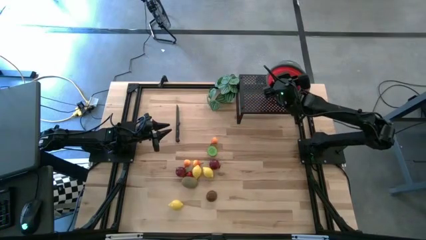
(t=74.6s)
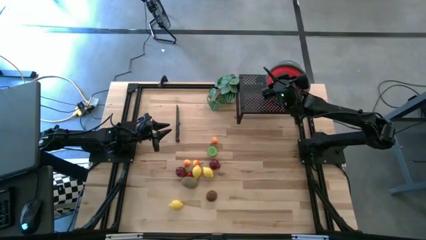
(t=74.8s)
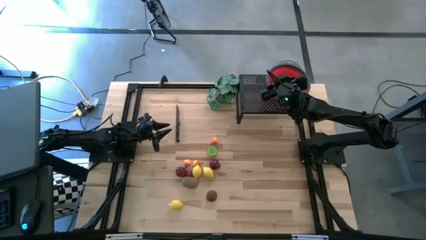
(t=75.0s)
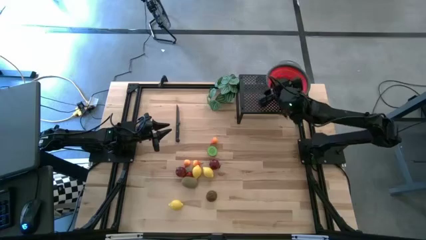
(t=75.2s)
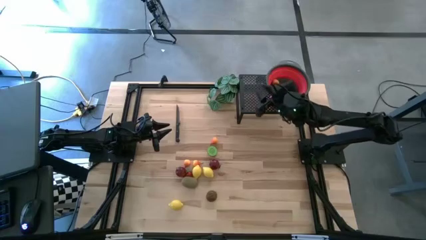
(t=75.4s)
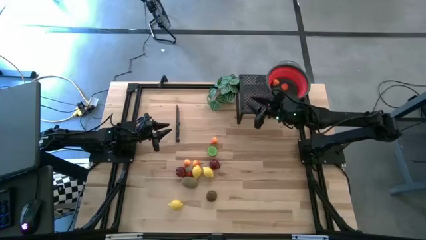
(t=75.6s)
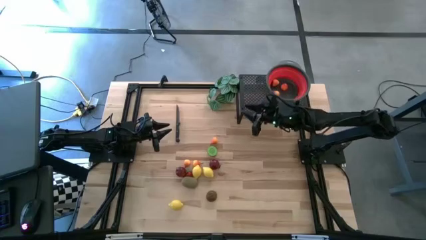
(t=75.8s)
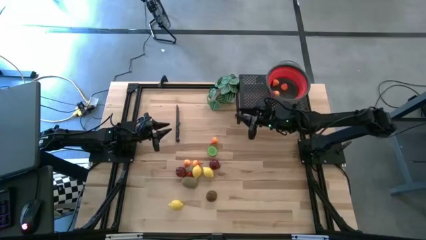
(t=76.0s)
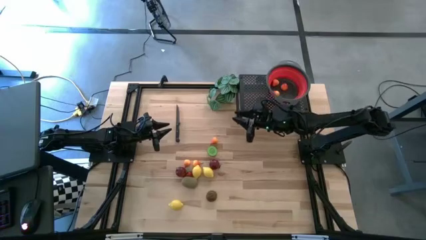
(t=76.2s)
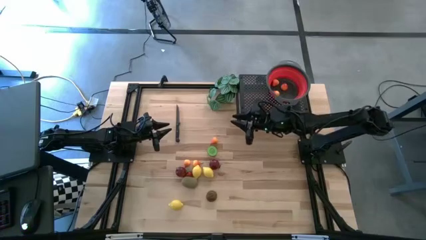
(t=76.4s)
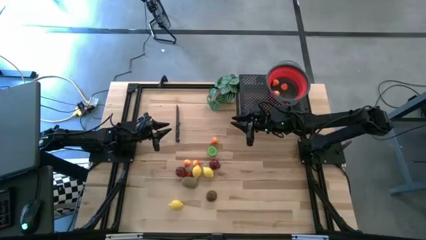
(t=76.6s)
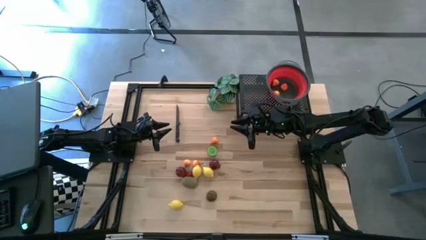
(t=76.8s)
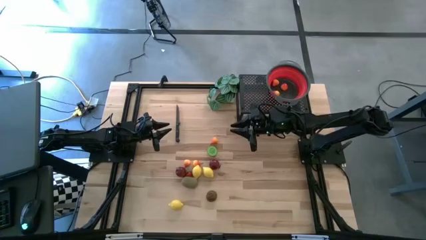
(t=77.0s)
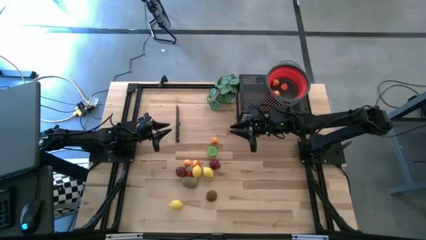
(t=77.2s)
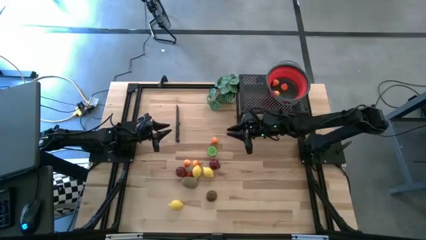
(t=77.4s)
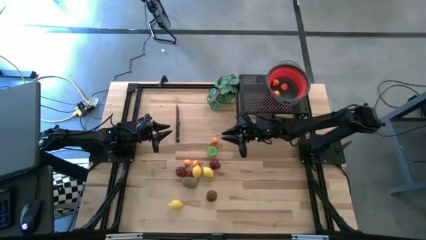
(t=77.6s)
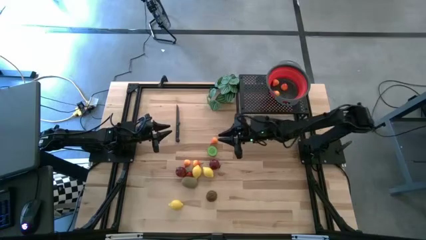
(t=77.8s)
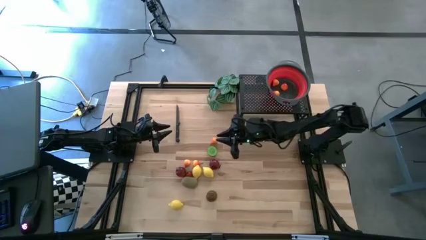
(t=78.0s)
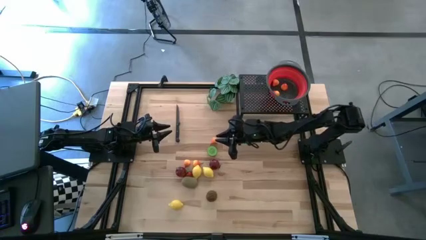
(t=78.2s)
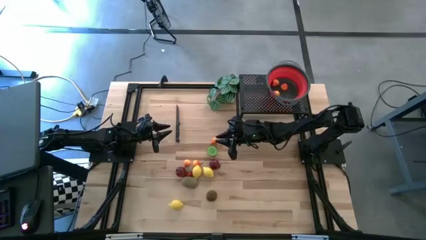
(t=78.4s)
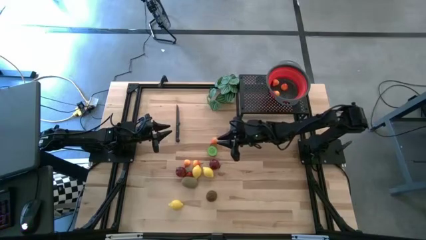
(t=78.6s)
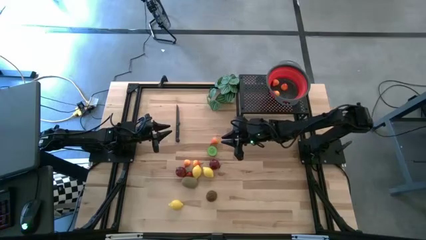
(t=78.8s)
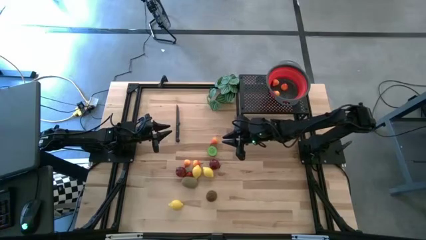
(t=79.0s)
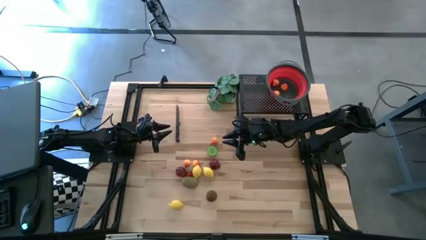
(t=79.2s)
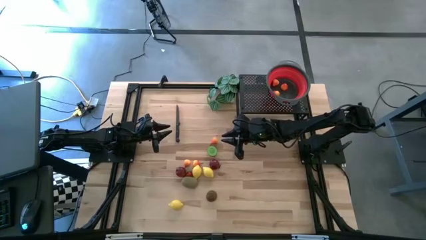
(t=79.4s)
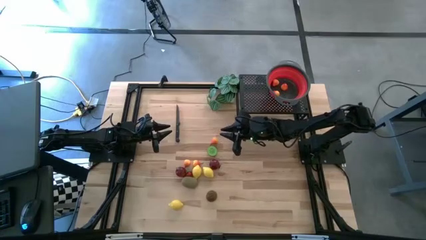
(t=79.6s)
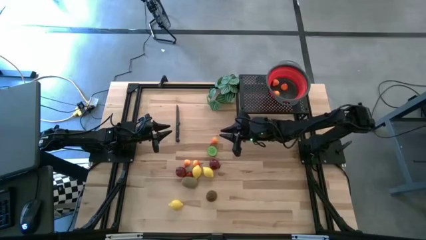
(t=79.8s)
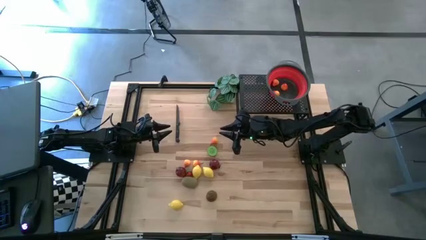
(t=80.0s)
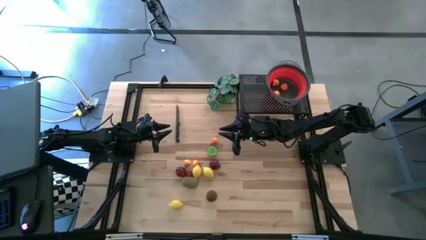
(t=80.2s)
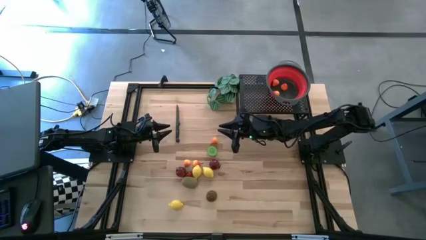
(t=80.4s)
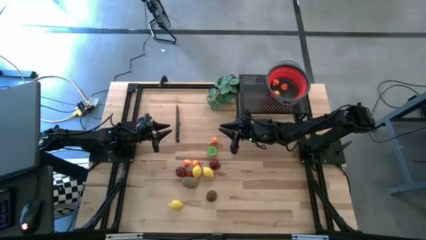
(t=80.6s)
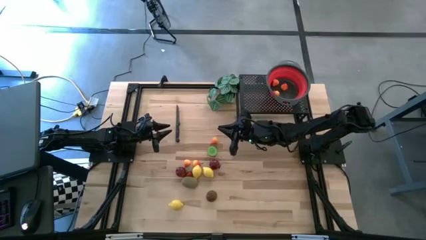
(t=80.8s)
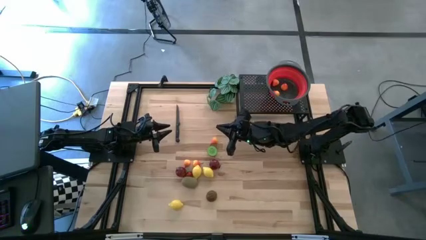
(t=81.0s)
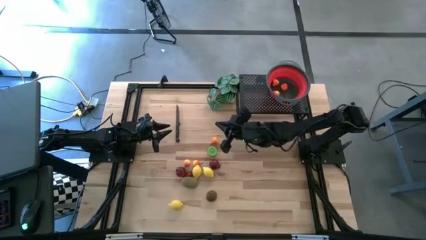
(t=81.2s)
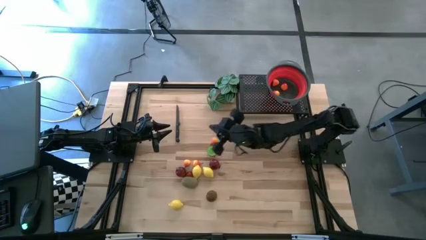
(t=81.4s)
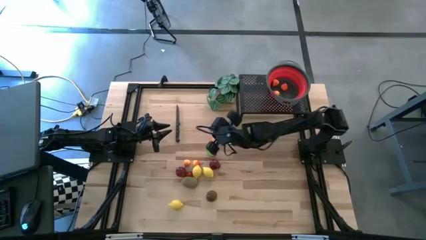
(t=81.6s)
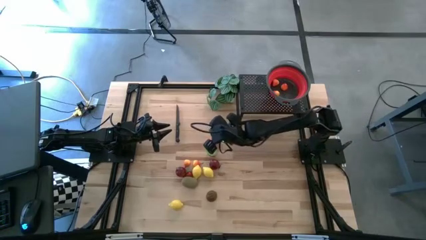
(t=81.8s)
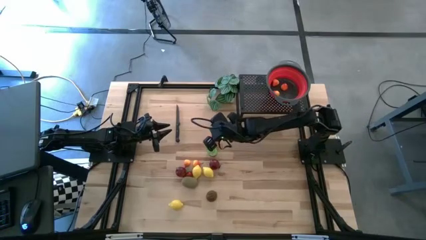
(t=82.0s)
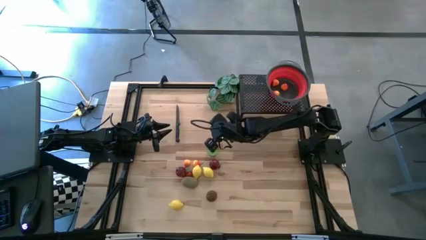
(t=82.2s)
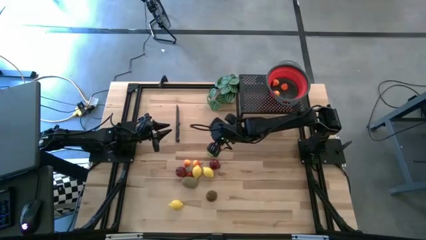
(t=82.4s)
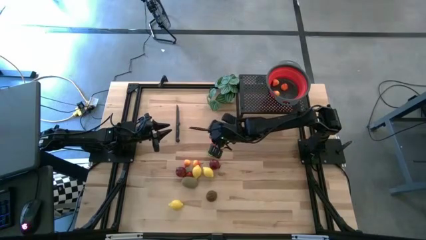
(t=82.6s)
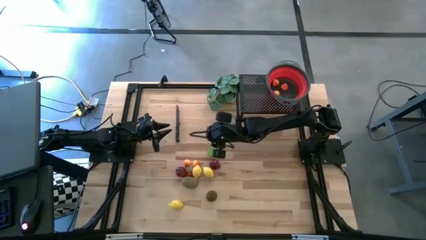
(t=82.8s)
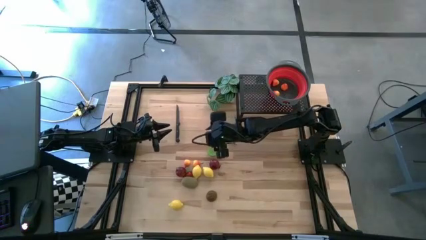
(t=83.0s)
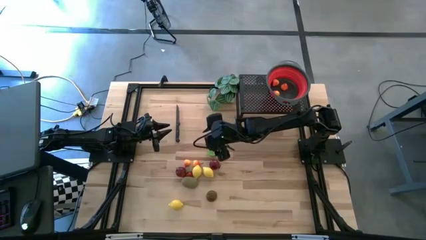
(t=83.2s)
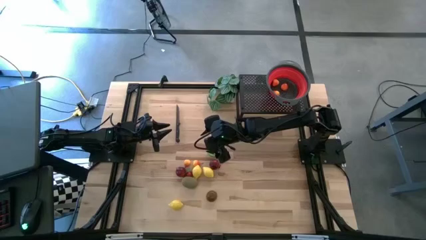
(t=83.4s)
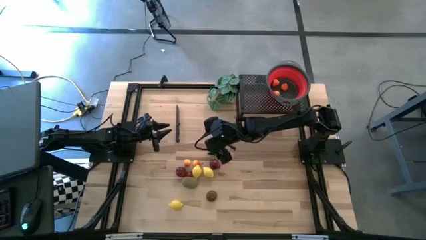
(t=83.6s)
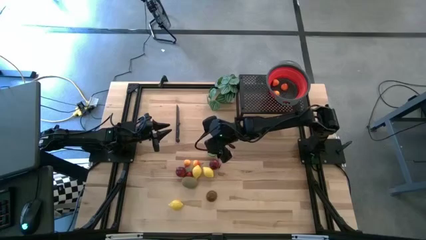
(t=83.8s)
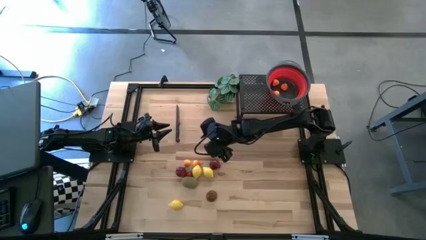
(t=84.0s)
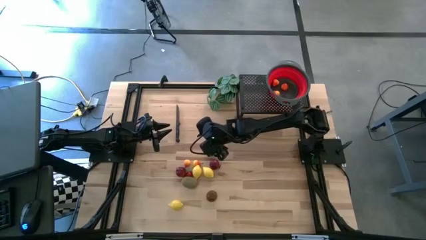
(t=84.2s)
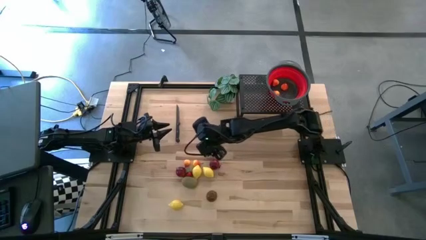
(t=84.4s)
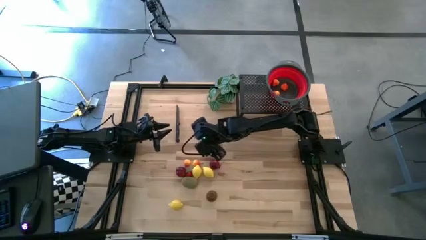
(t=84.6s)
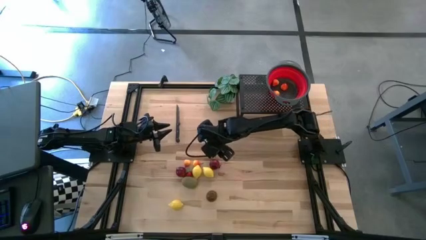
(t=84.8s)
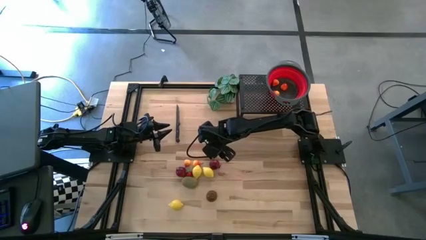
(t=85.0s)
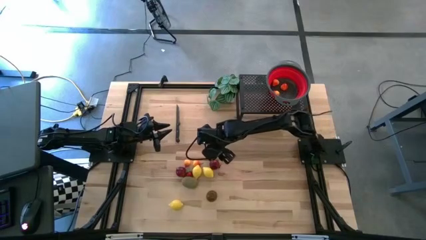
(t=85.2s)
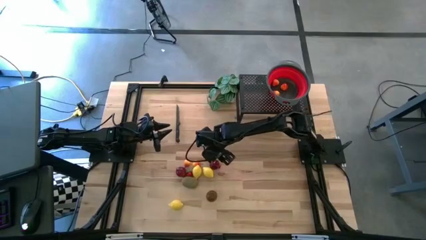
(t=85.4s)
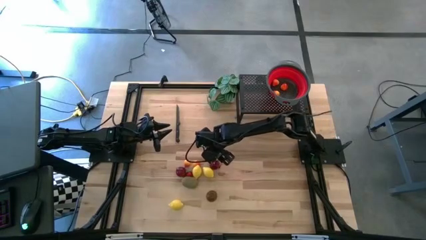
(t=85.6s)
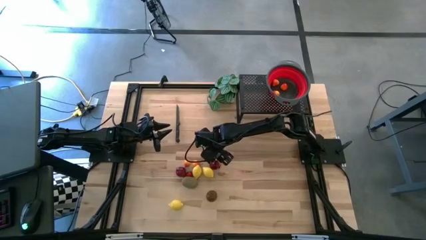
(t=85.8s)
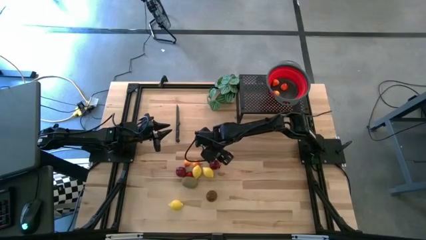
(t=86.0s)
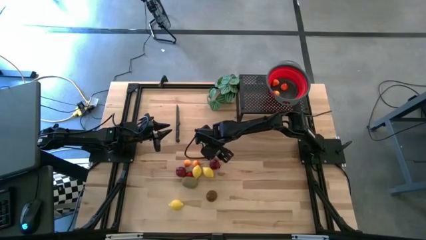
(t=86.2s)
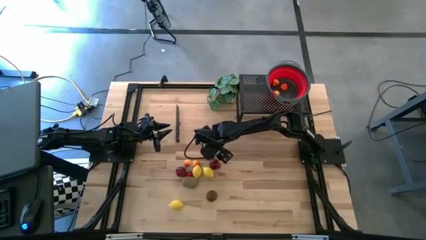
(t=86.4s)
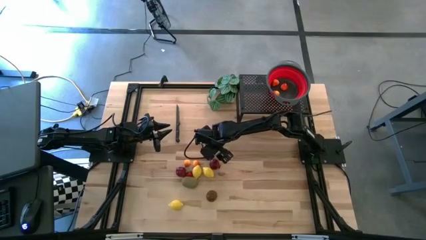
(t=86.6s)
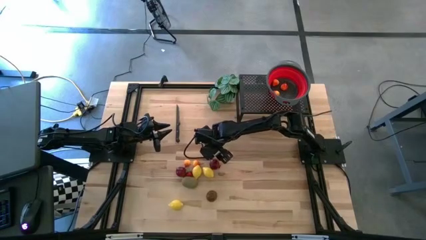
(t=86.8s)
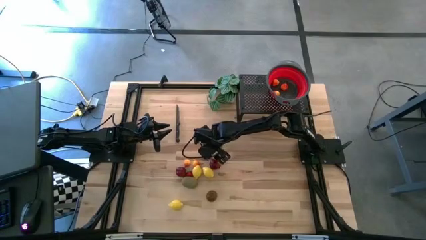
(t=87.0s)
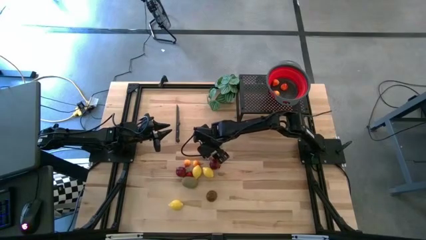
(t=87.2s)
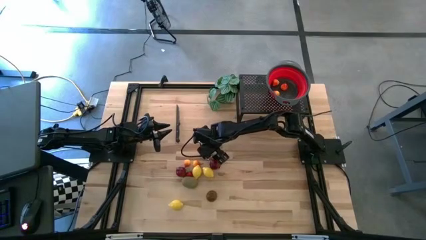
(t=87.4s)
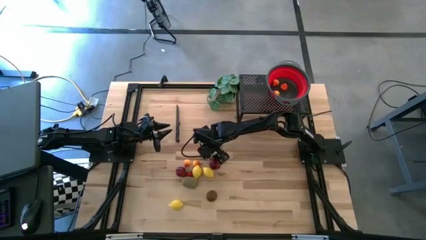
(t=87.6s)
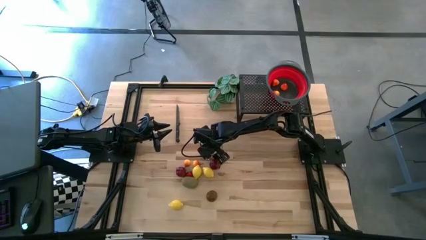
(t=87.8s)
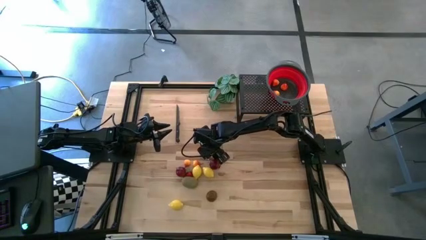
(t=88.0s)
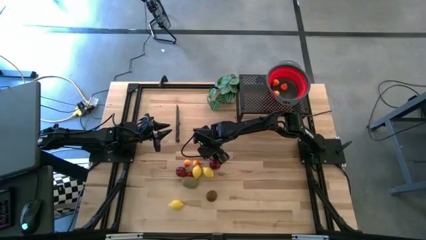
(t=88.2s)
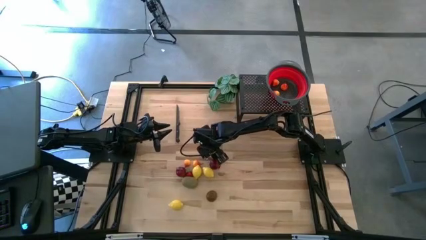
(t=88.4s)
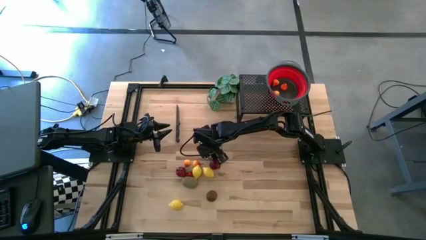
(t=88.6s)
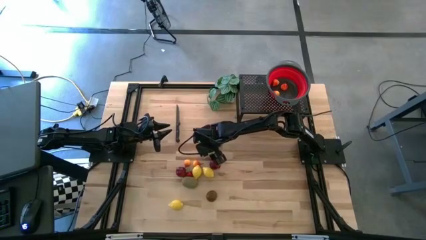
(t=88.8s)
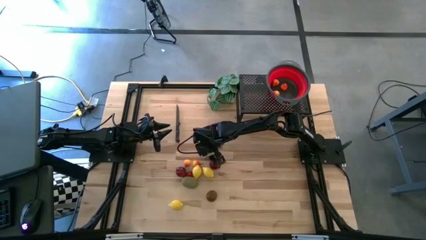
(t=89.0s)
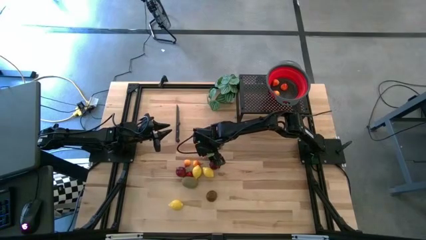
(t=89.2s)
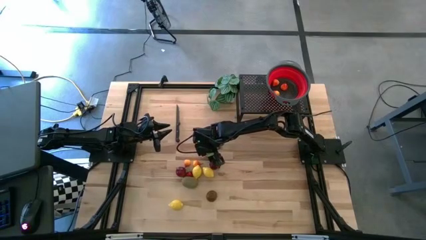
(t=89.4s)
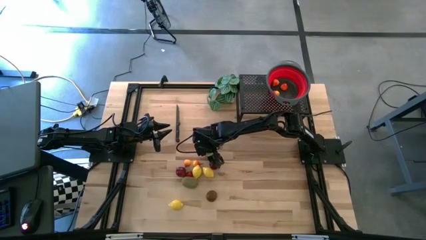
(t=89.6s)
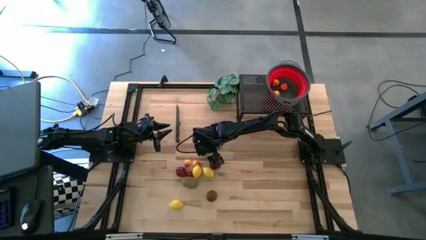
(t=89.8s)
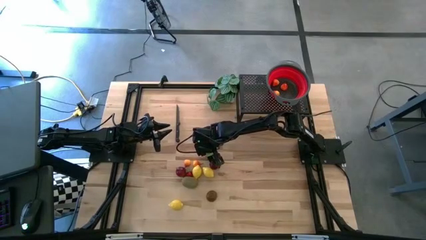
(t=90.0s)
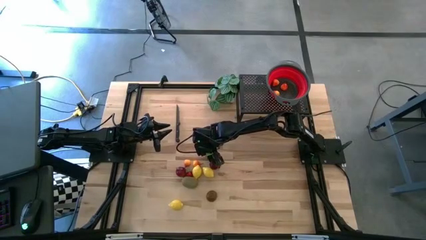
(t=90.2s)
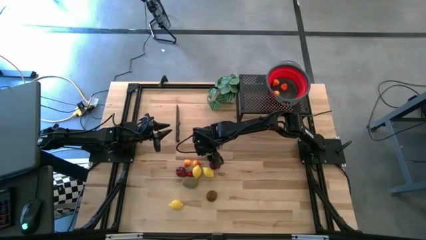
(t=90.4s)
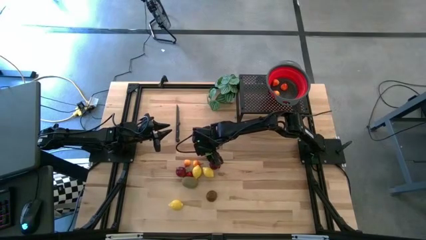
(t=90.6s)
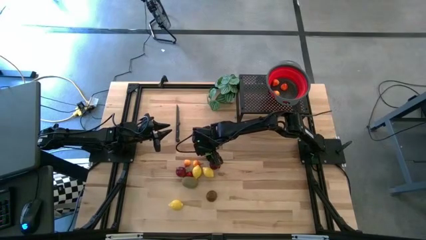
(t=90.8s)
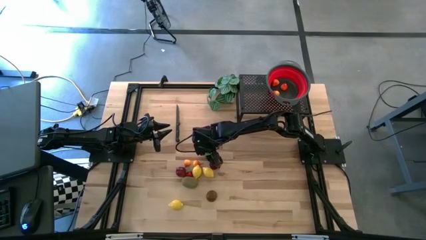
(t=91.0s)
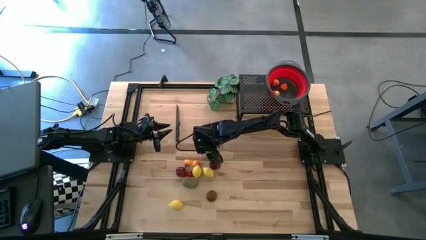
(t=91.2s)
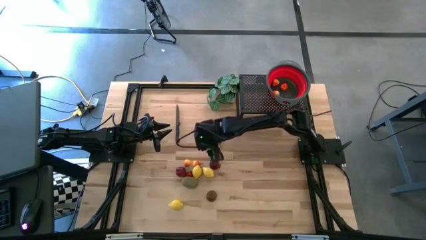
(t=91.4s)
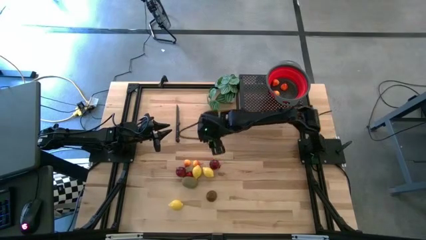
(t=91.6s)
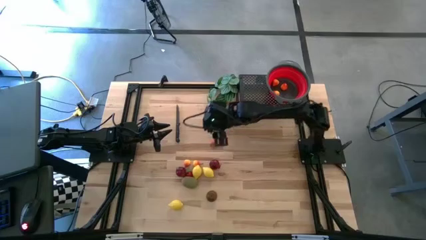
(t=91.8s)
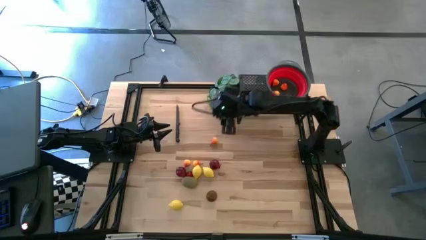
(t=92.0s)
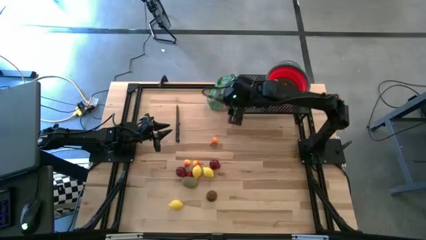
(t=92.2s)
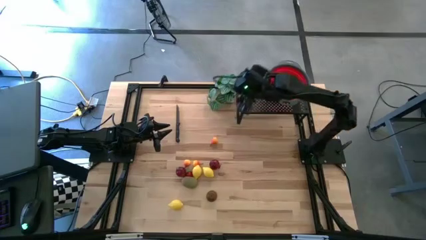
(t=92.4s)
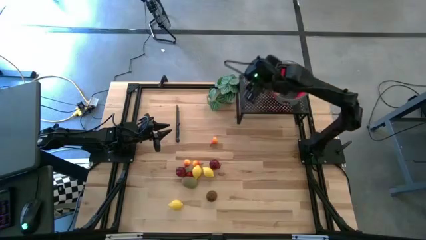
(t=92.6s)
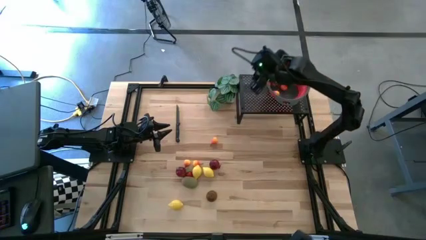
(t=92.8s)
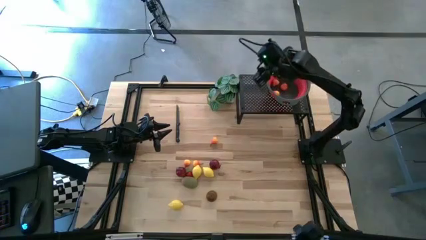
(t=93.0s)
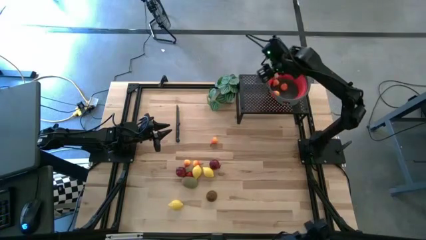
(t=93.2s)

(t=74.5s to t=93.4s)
Task: Pick & Place Fruit
Put the half brown kiwi into the red strainer bowl
